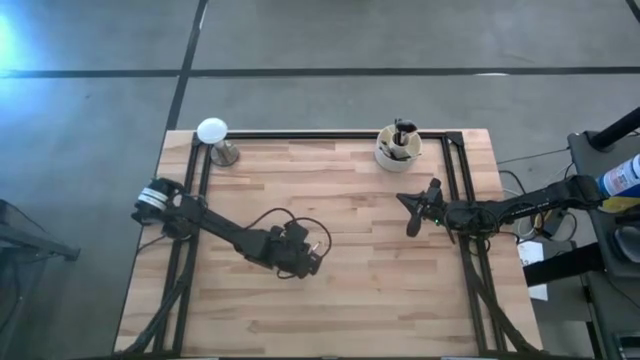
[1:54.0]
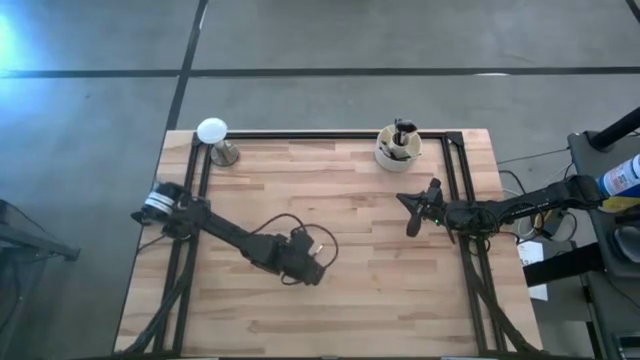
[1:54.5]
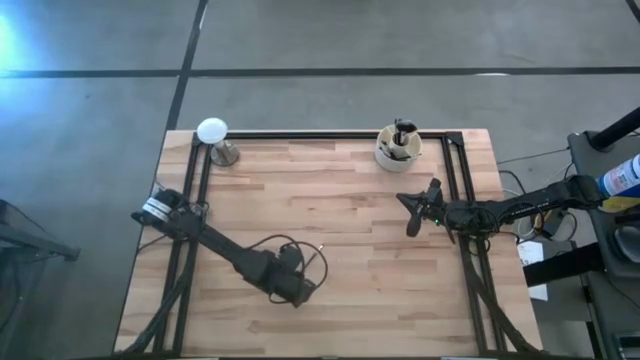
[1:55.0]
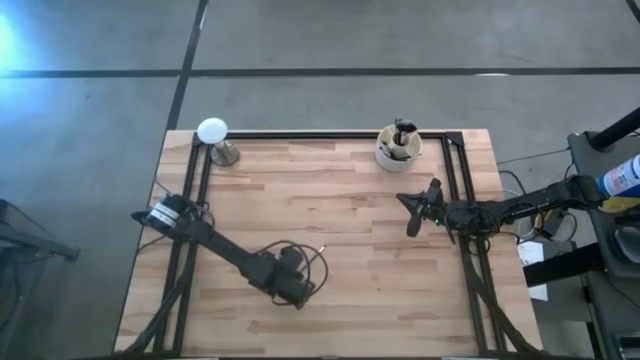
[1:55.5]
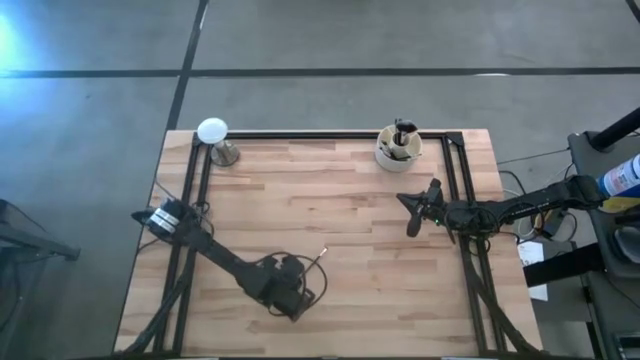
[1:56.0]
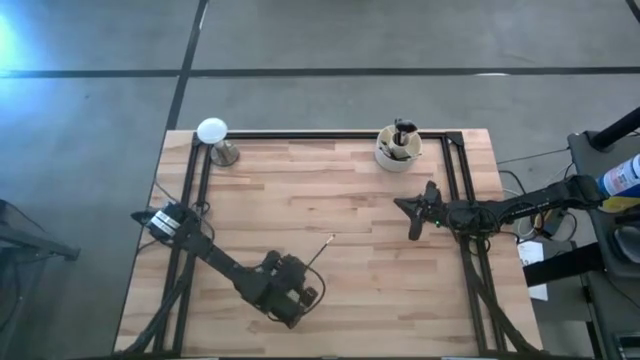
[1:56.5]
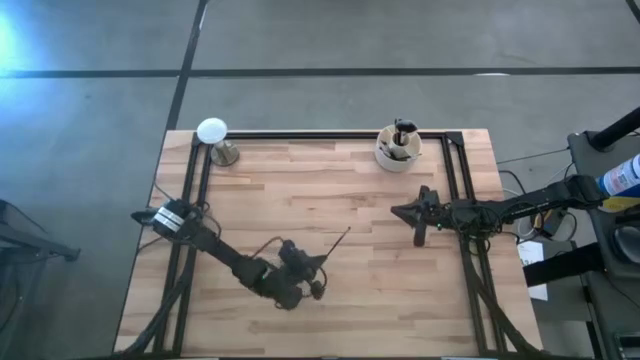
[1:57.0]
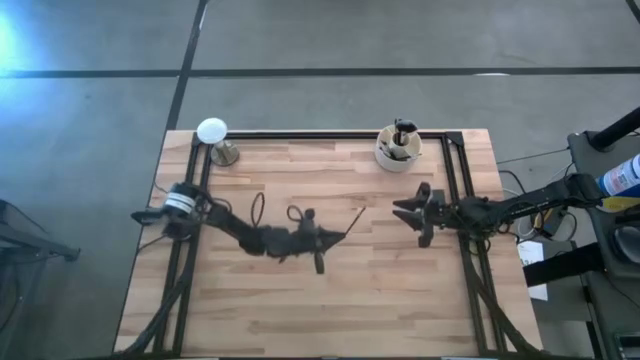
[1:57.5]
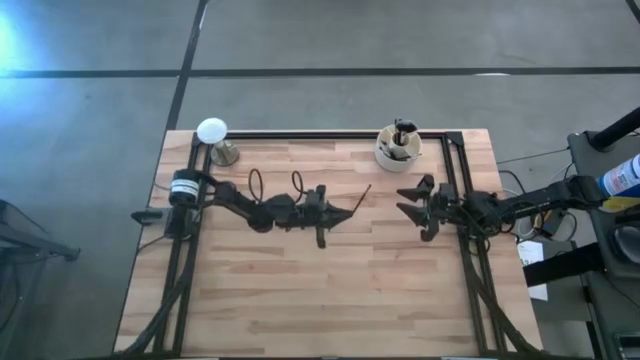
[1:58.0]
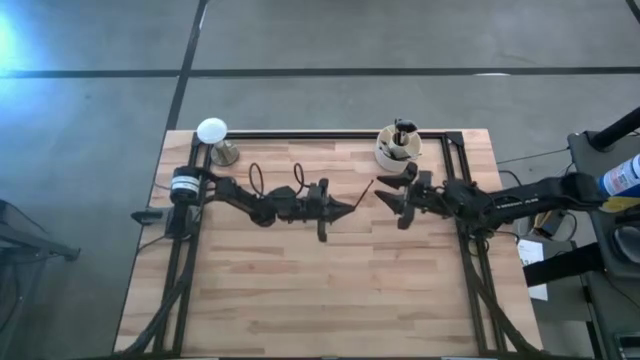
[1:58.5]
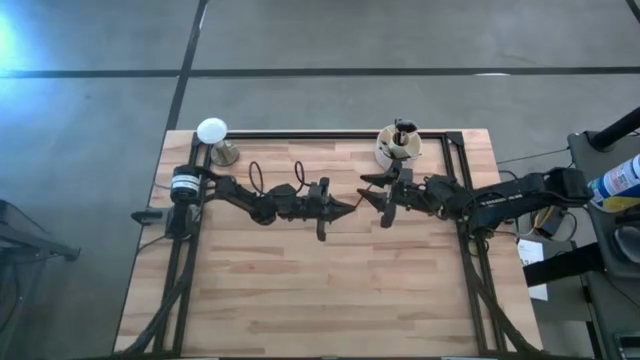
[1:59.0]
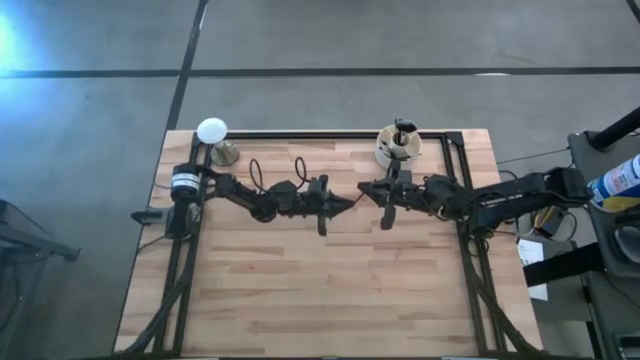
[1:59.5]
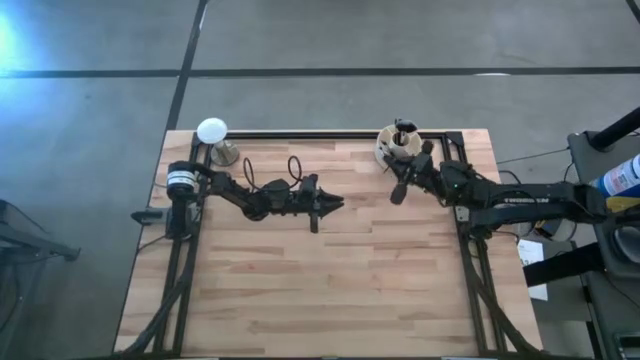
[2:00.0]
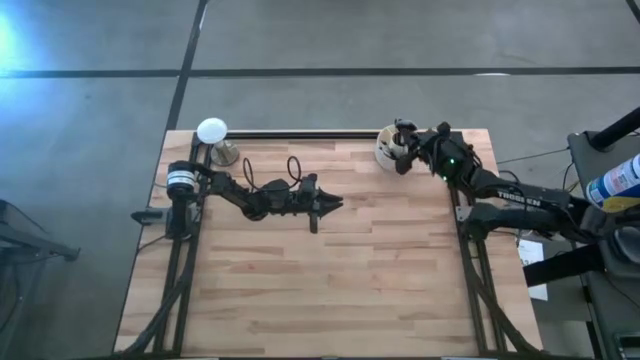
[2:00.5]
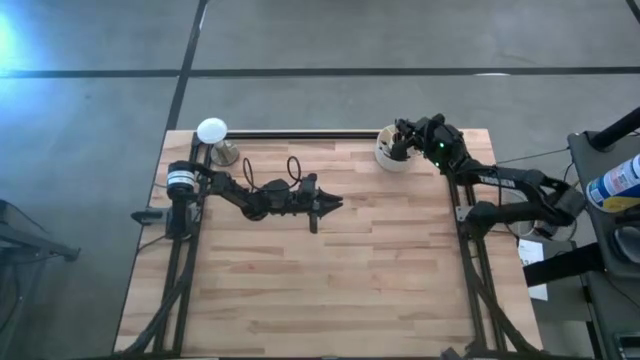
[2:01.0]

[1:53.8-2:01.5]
Task: Put items in baskets/containers
Put the black eyeshadow brush into the white pen organizer

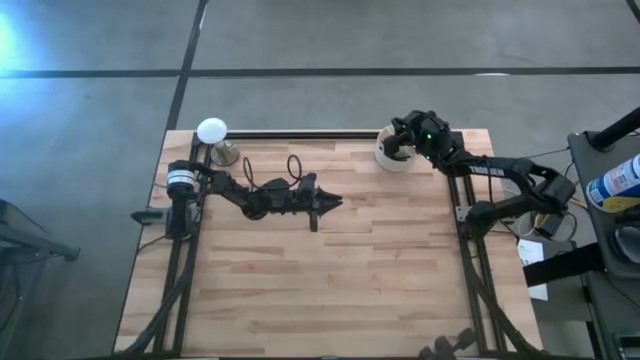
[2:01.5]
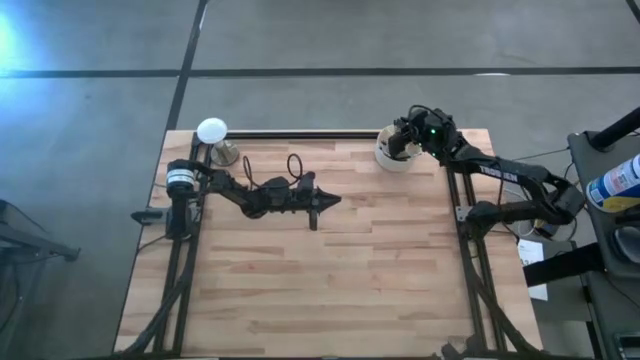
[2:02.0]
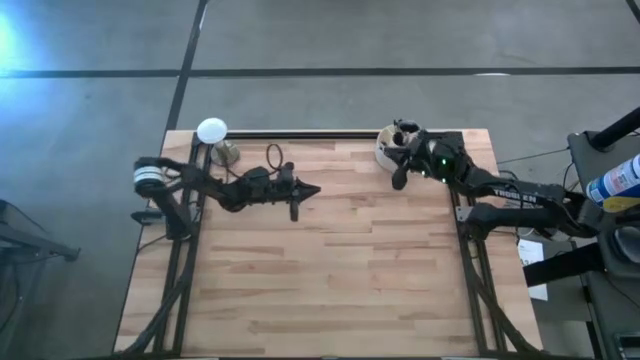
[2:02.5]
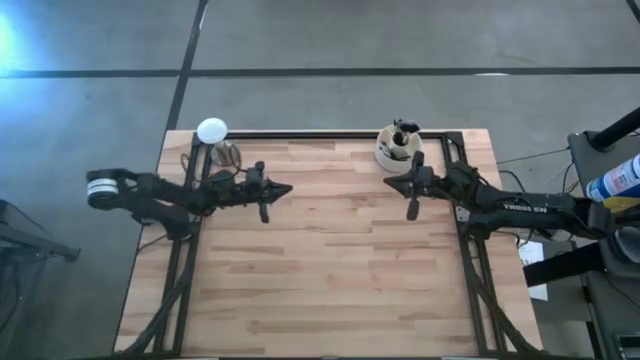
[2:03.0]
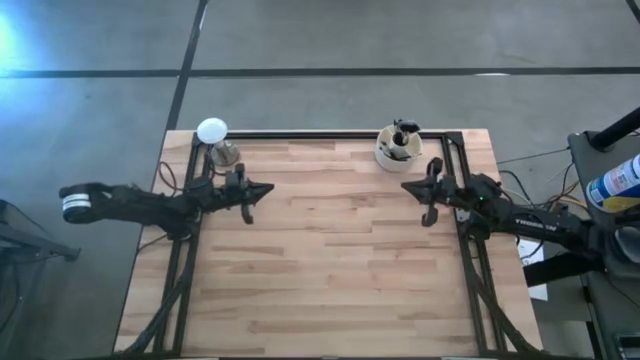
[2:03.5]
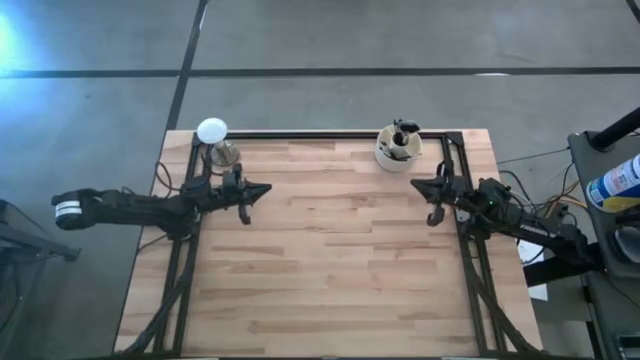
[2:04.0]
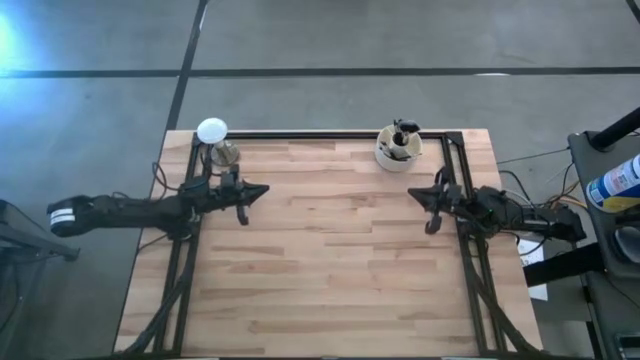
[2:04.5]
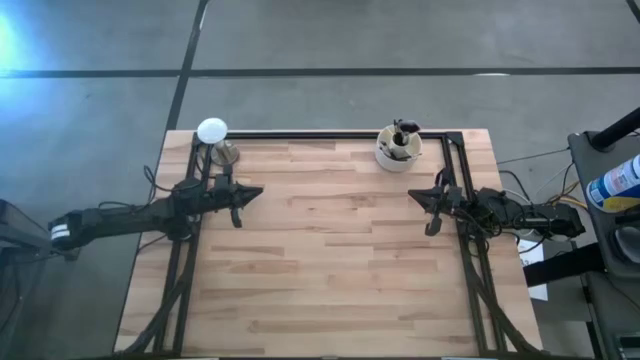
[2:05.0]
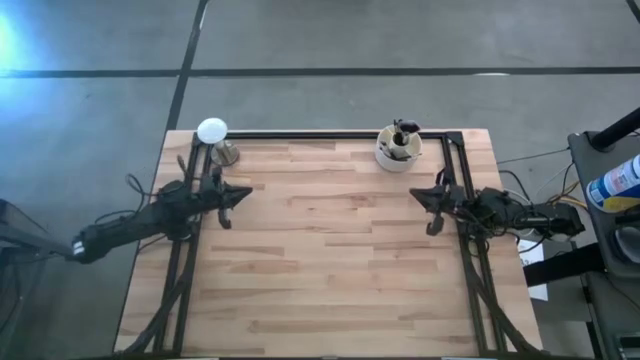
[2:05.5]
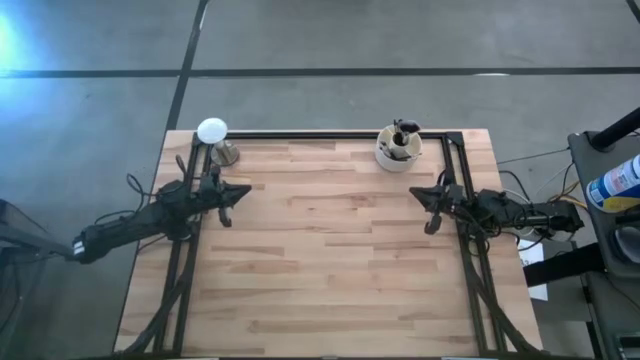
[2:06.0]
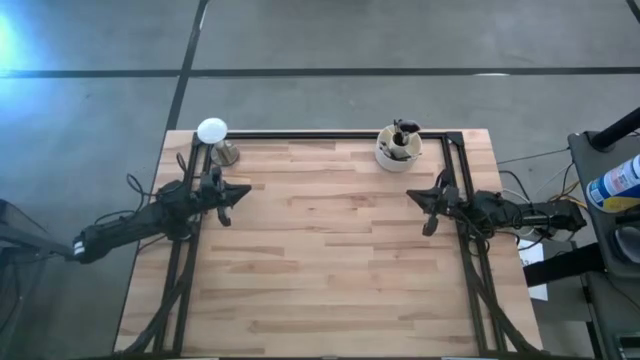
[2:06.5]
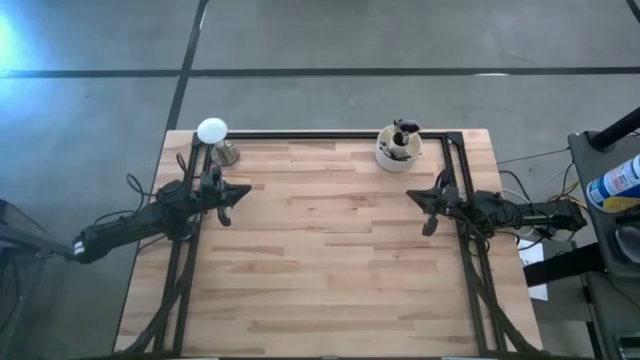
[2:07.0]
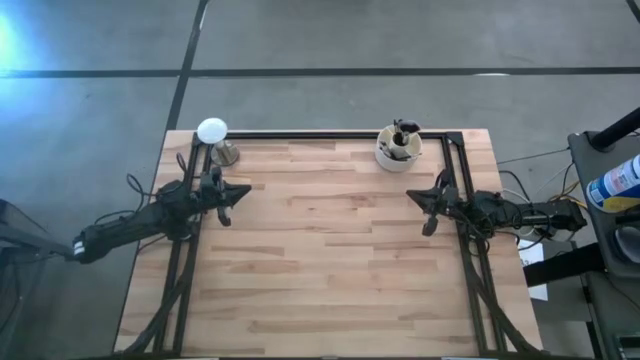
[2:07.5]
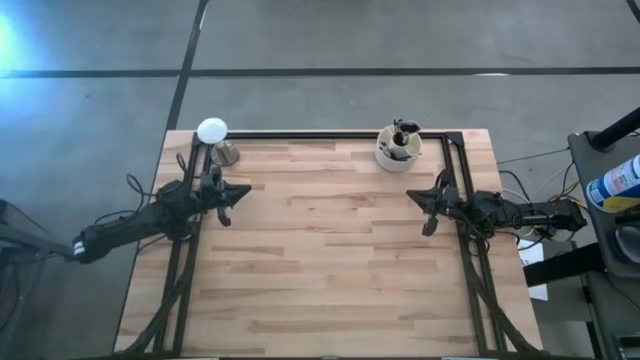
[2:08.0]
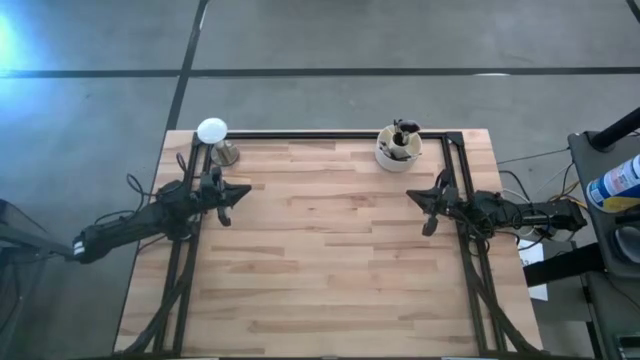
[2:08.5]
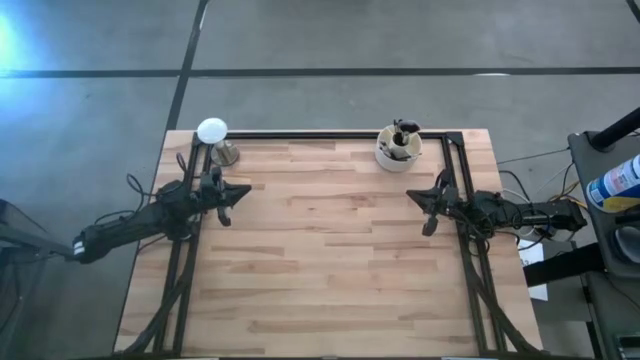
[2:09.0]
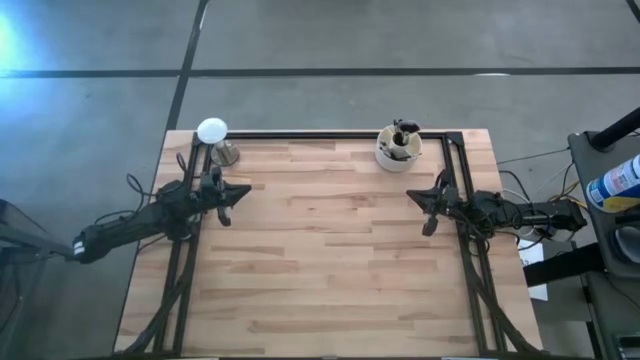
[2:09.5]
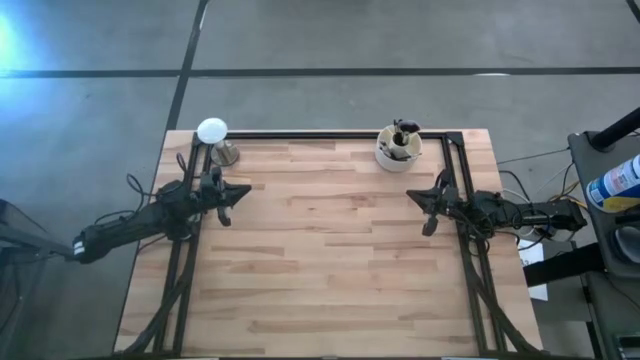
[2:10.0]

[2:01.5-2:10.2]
Return to Home Position

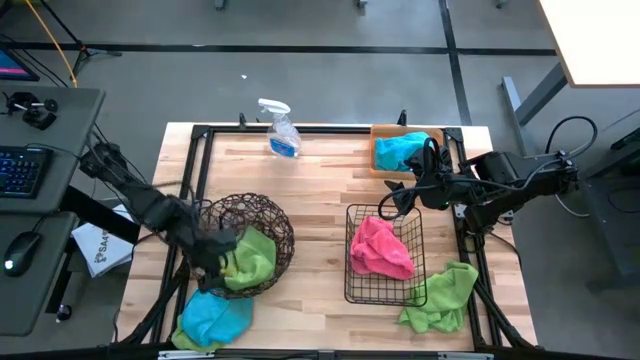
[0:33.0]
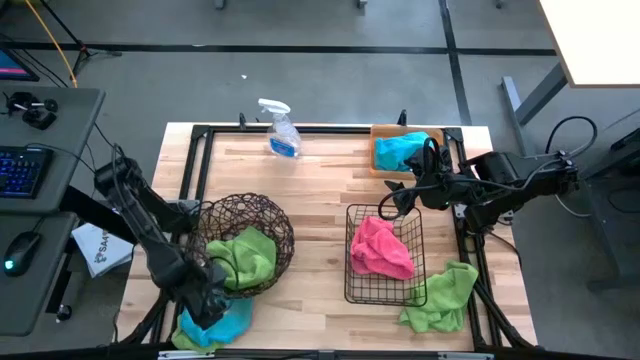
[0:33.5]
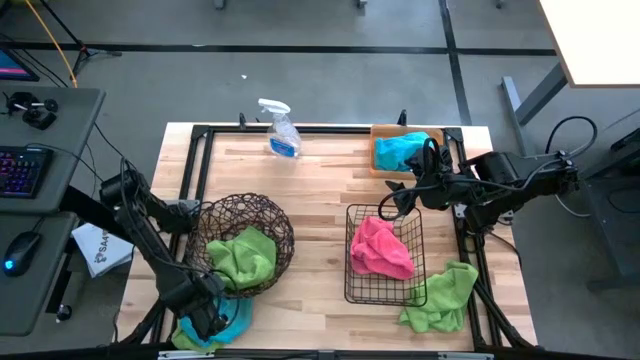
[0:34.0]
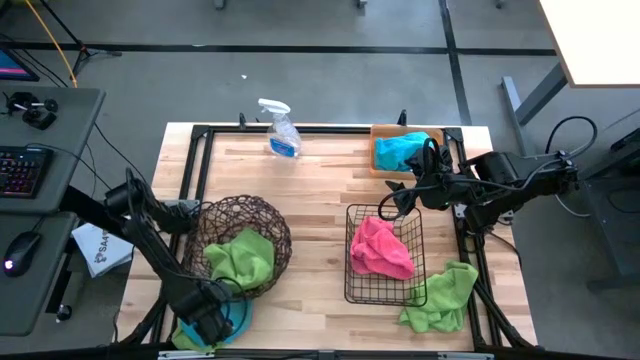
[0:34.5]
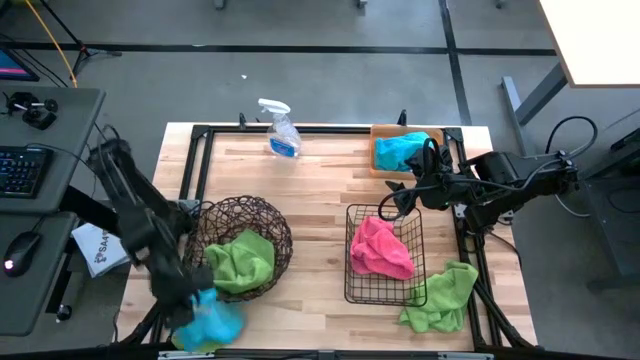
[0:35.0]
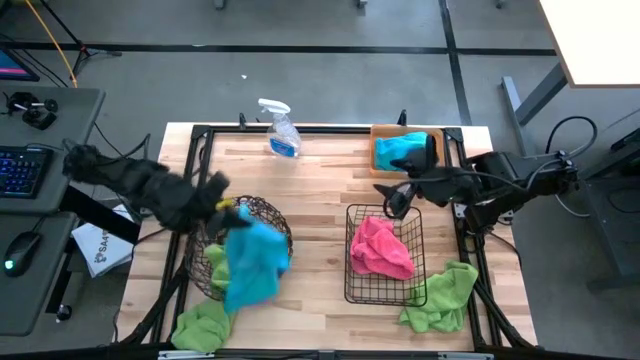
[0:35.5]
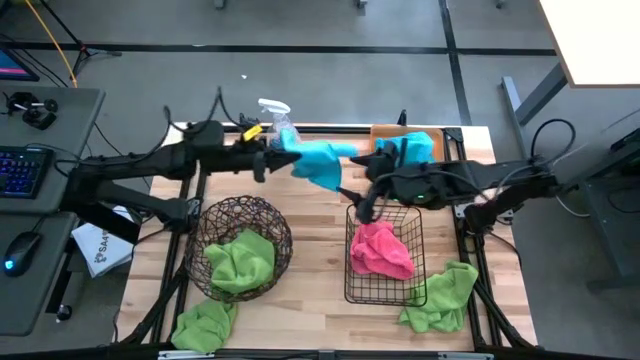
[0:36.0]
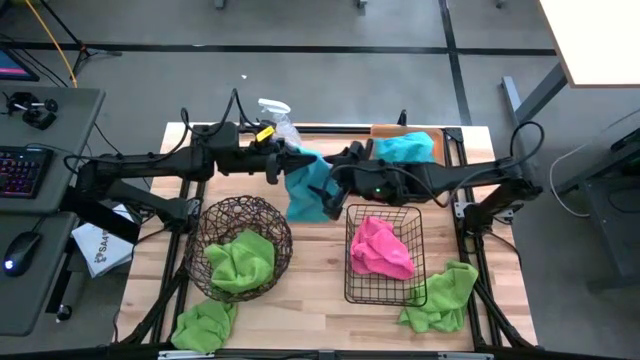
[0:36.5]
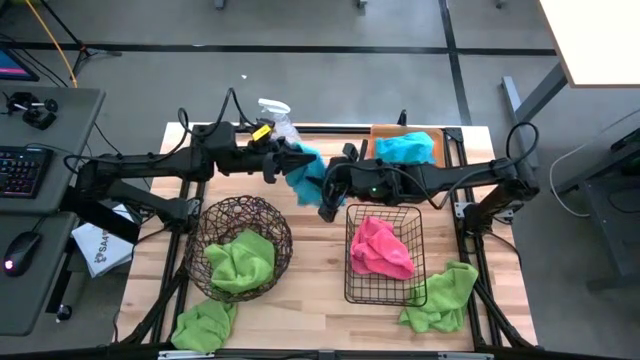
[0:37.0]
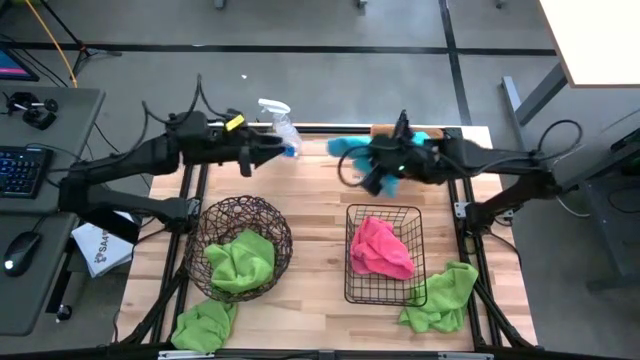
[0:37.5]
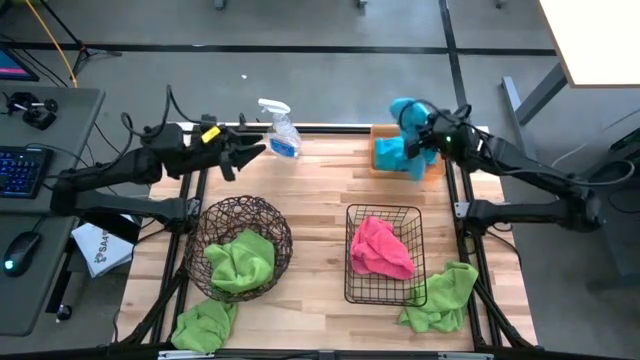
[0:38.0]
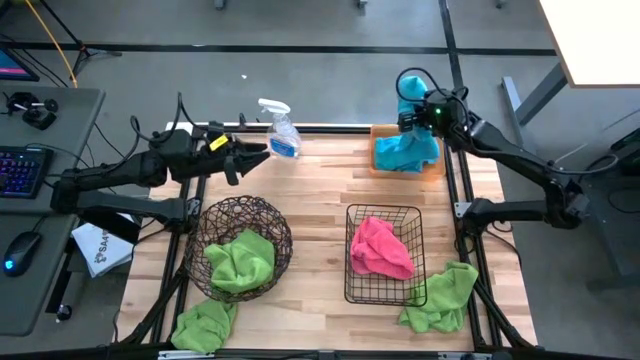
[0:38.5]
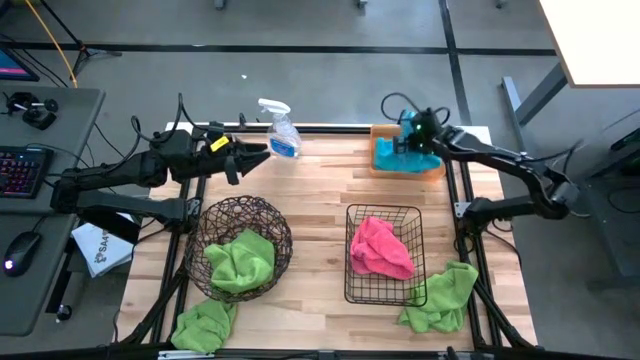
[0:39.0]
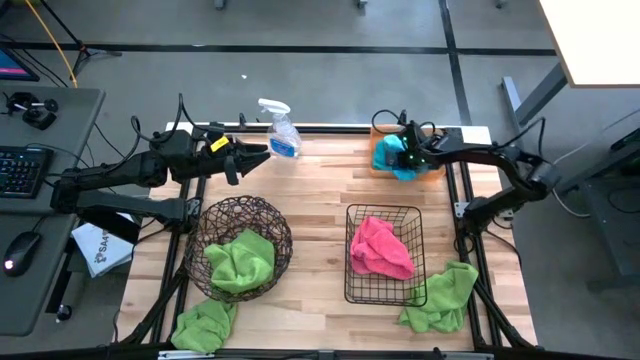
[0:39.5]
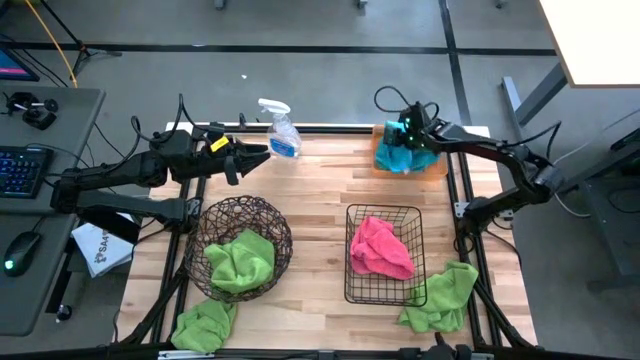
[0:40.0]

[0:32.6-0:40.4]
Task: Sort microfiber towel by color & place in baskets
Put the blue towel into the orange transparent bin
